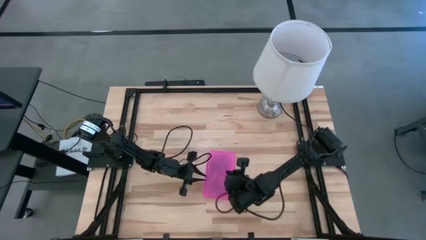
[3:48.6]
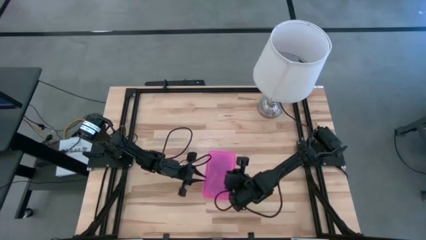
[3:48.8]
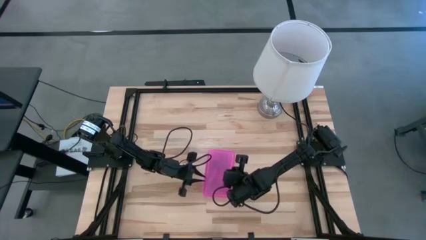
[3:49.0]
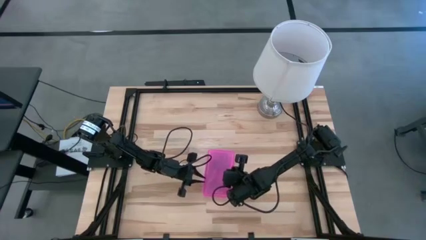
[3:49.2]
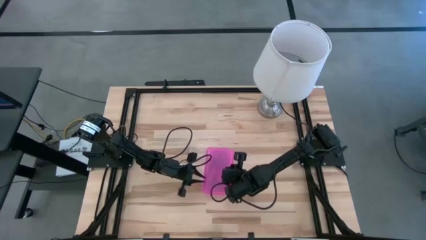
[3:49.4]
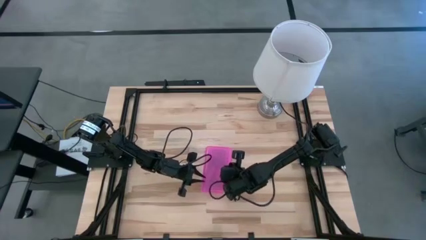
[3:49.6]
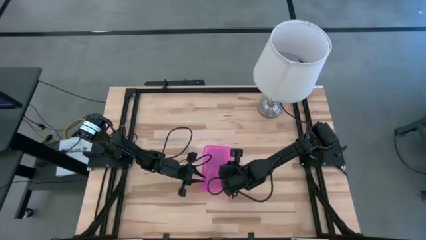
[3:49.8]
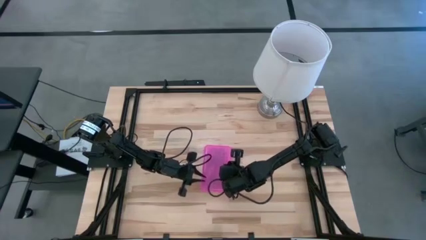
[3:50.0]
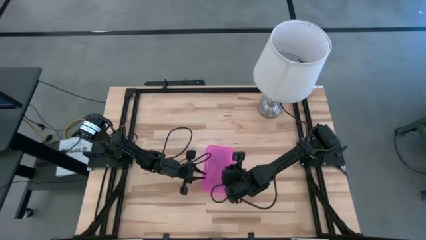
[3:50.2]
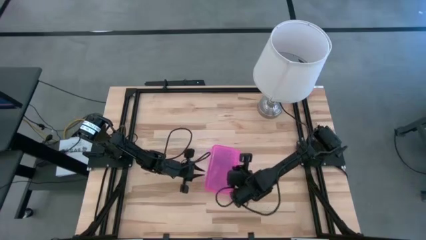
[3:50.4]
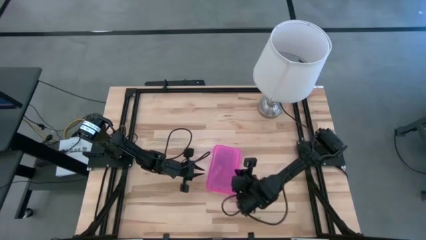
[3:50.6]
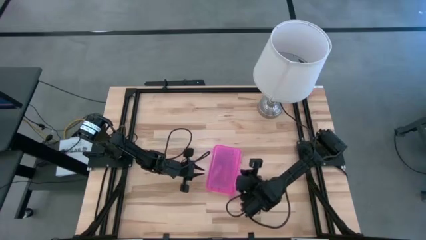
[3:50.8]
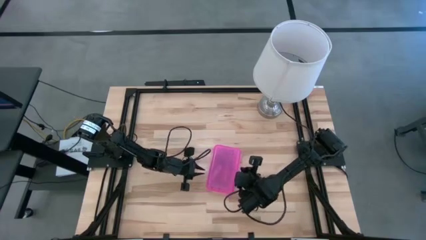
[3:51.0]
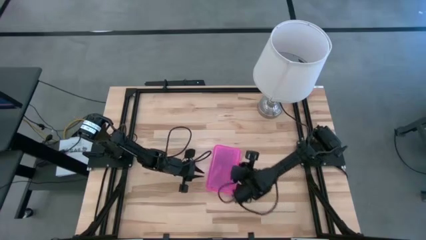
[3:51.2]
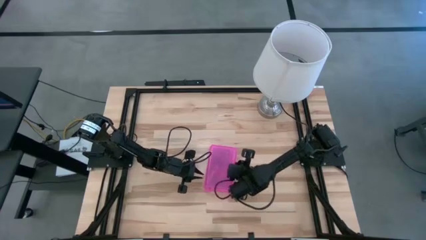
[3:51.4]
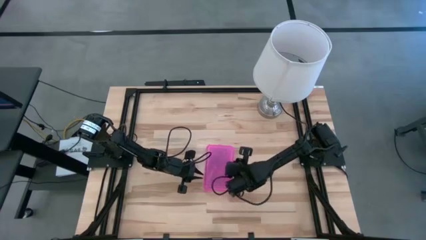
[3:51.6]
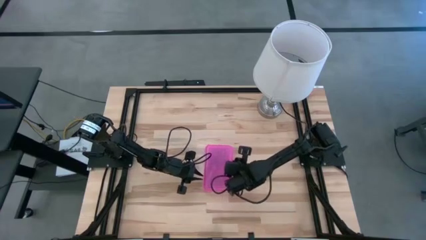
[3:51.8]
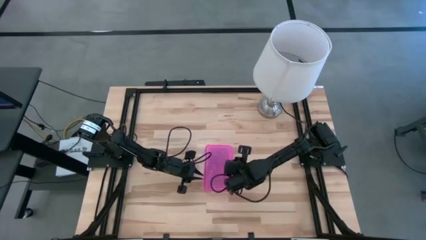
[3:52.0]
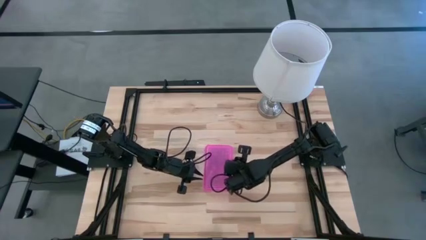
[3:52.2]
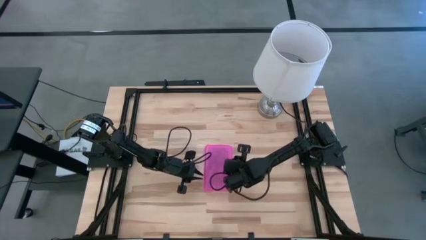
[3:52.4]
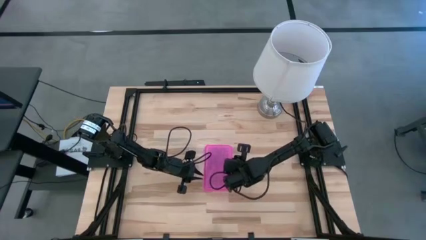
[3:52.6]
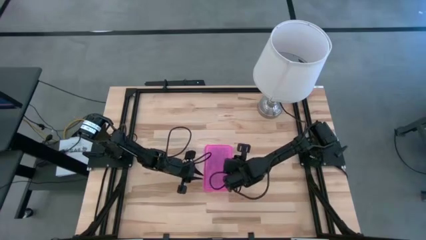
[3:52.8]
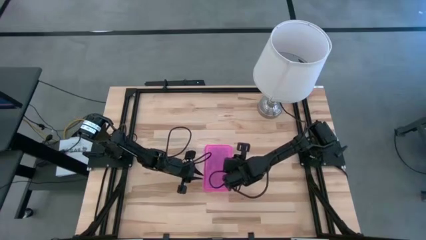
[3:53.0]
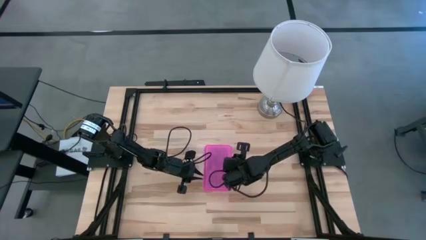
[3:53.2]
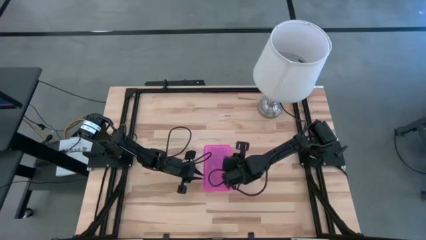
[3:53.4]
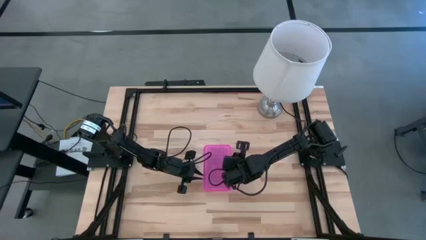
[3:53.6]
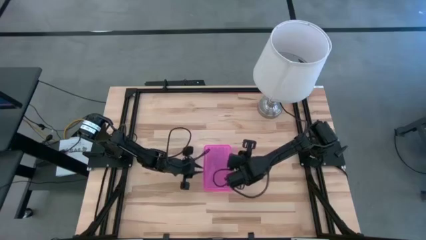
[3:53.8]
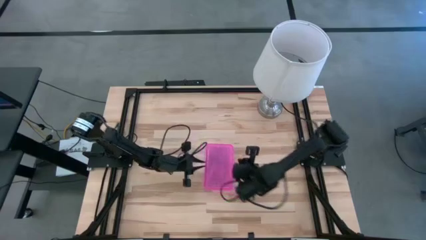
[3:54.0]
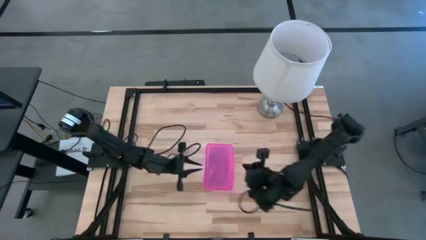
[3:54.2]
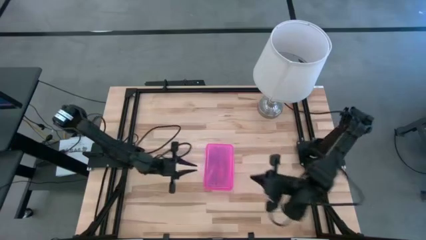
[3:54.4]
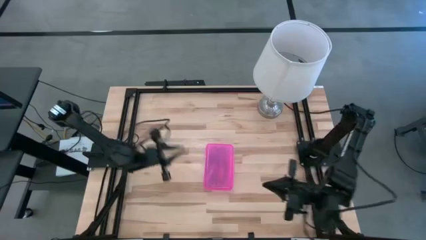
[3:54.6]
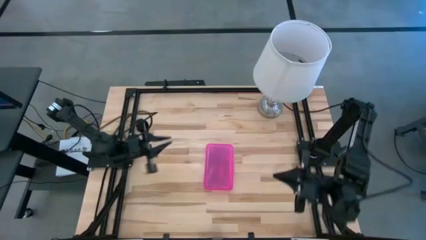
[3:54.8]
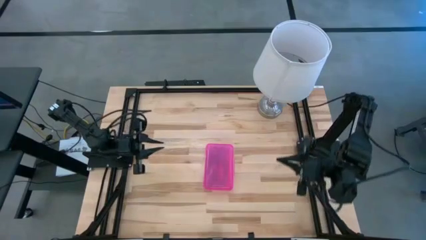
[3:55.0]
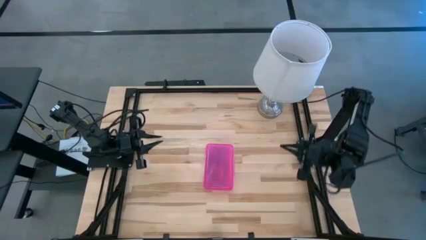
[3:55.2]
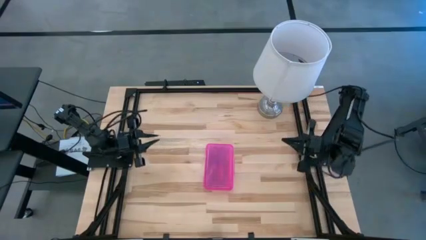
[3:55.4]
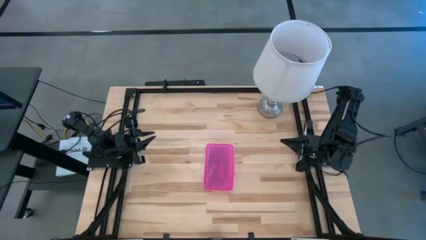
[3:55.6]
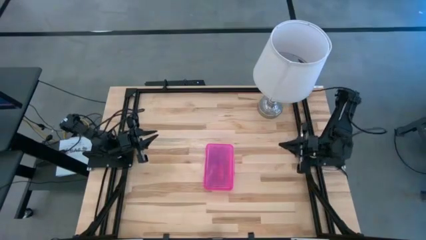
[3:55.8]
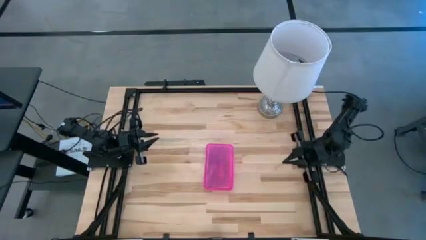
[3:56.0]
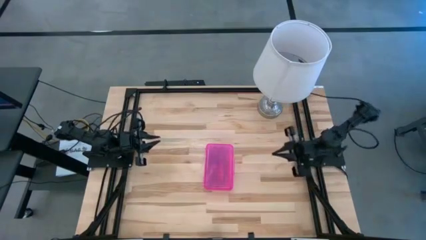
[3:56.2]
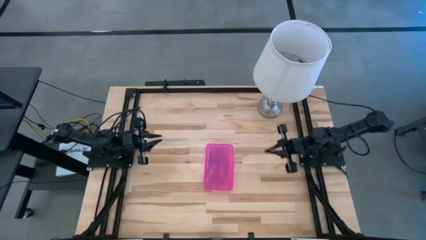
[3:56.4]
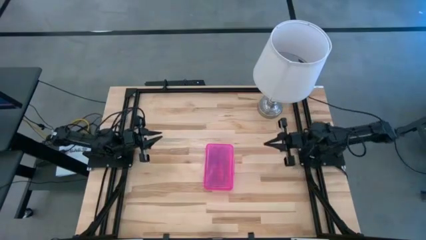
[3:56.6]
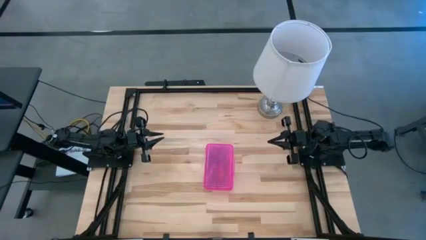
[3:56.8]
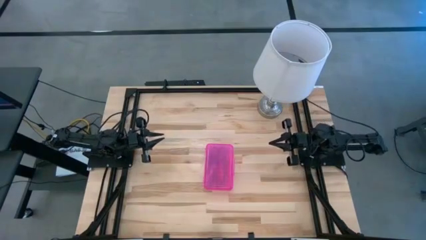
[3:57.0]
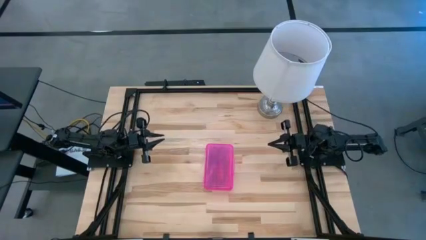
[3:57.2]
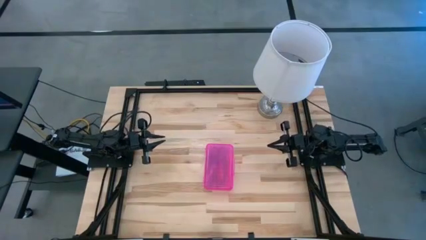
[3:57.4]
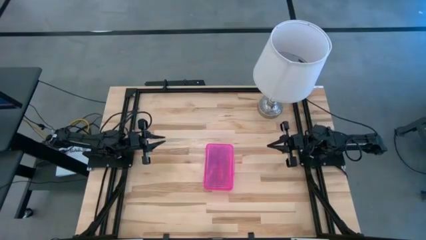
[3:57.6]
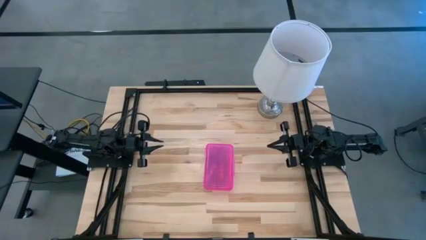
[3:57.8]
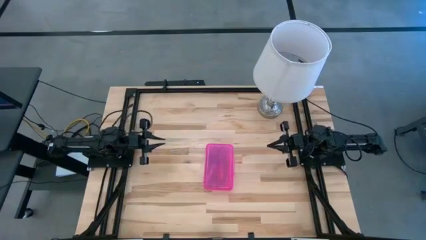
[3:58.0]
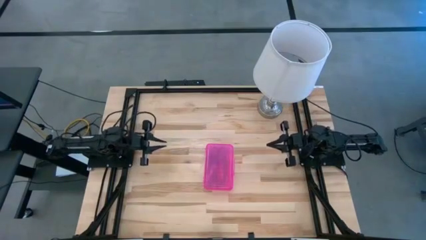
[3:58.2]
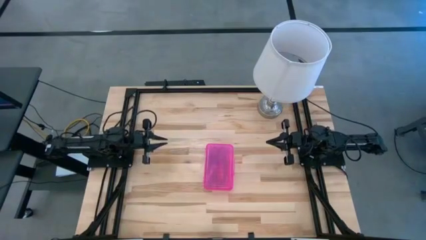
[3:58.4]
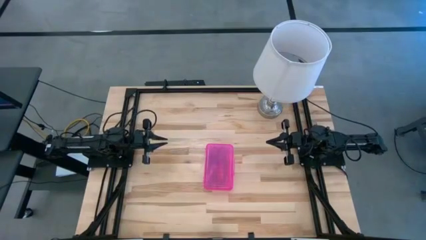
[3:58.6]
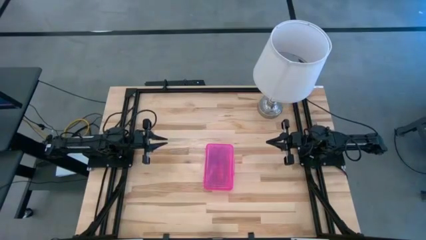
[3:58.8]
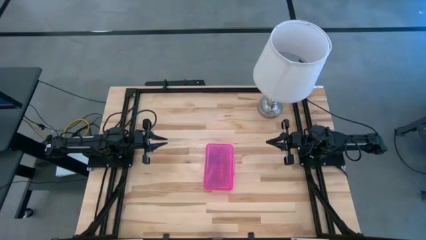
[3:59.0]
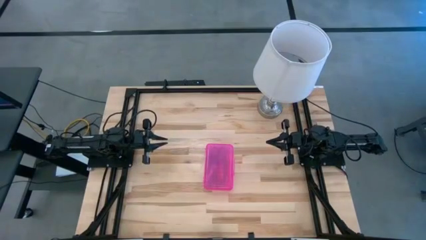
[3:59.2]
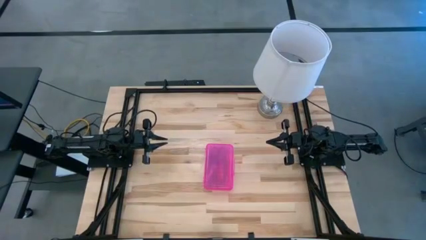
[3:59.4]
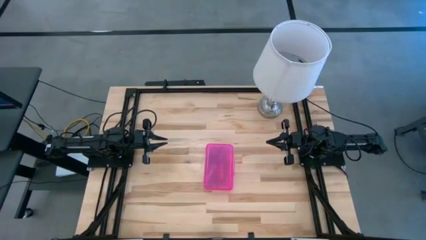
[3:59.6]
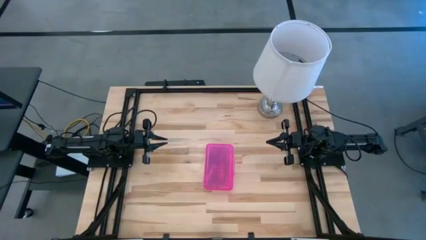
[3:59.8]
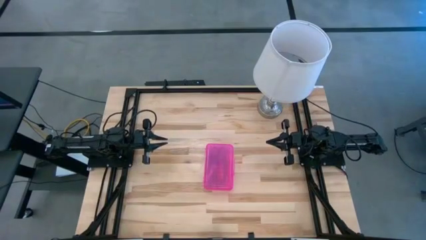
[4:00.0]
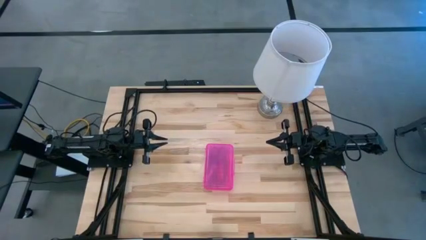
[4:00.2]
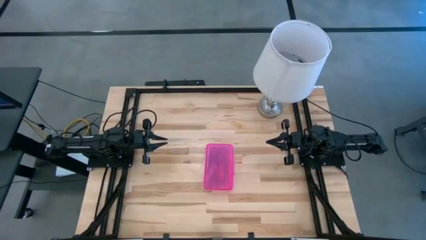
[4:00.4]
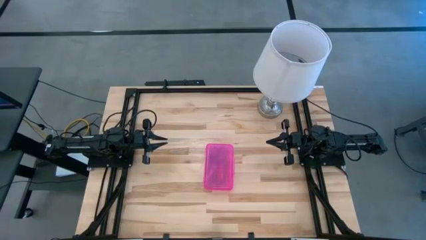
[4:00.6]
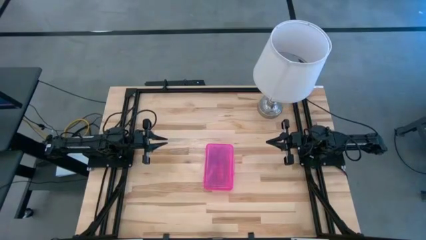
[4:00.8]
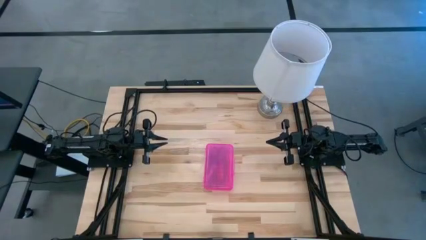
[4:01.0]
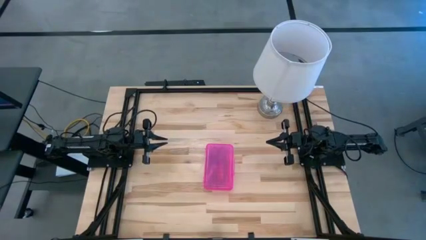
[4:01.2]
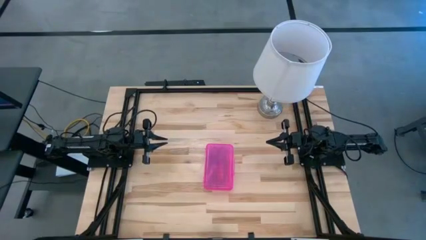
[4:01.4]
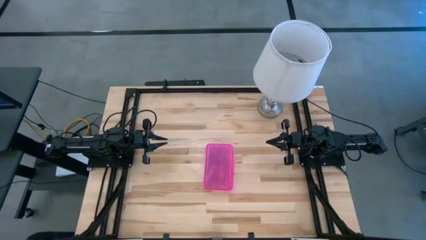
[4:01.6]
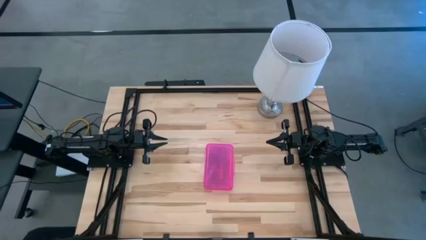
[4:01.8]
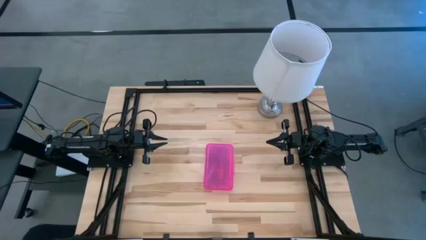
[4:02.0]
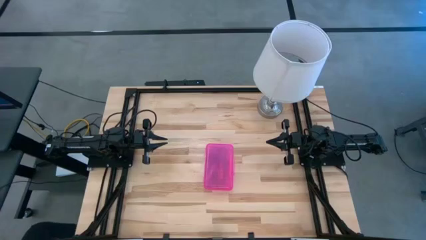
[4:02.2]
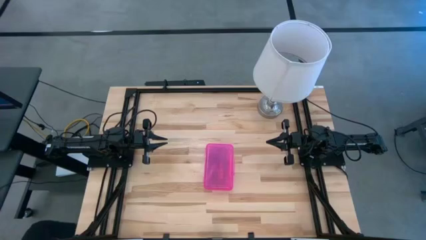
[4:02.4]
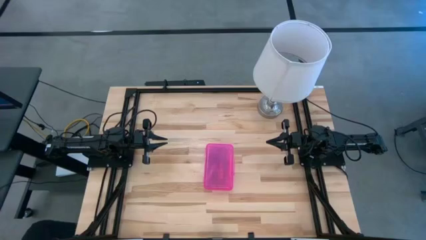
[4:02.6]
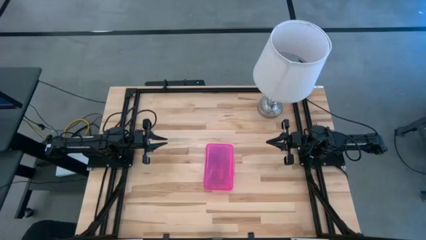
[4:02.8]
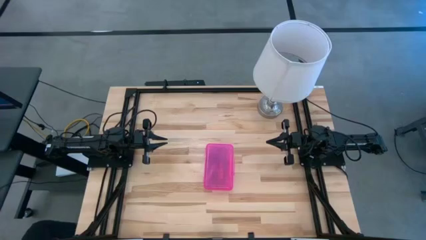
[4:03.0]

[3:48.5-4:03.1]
Task: Pick & place school supplies into a supply box
Return to Home Position

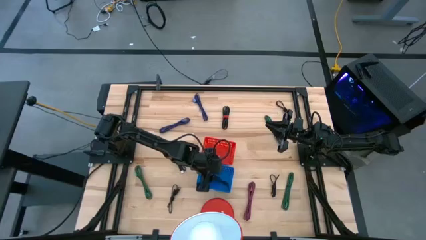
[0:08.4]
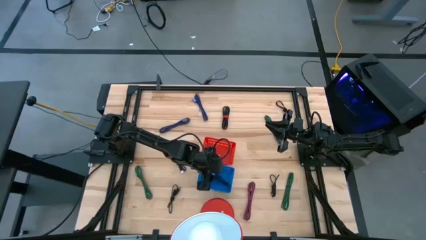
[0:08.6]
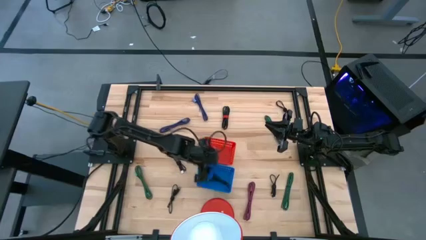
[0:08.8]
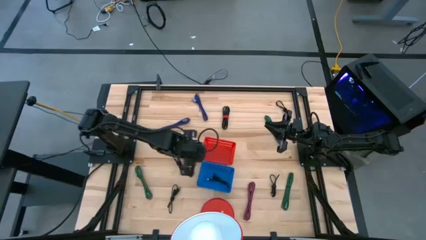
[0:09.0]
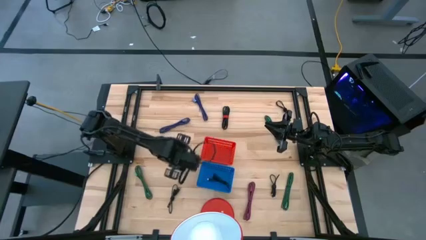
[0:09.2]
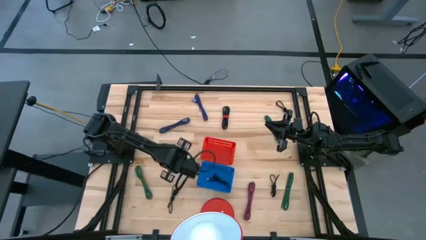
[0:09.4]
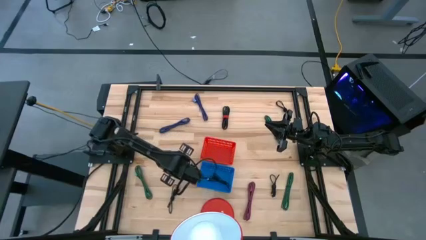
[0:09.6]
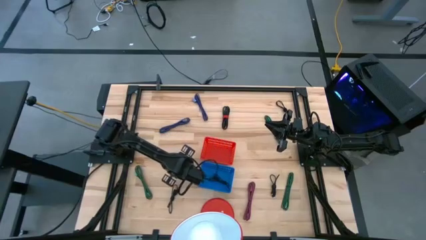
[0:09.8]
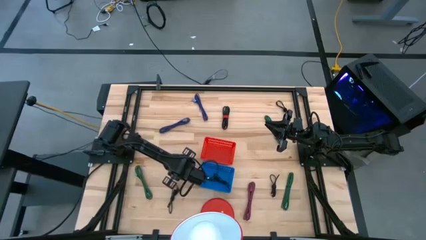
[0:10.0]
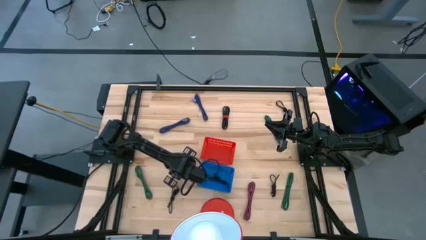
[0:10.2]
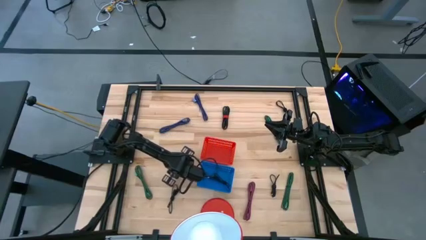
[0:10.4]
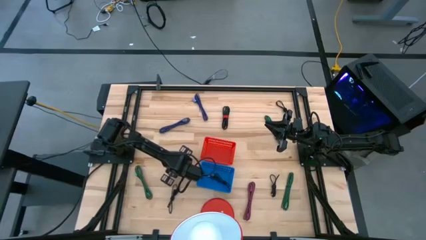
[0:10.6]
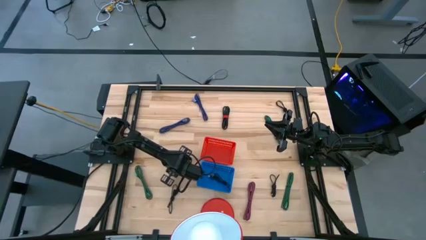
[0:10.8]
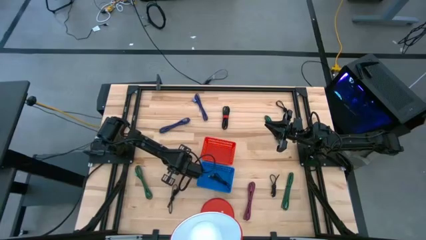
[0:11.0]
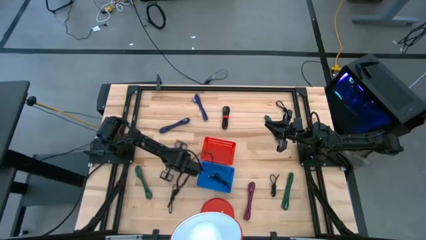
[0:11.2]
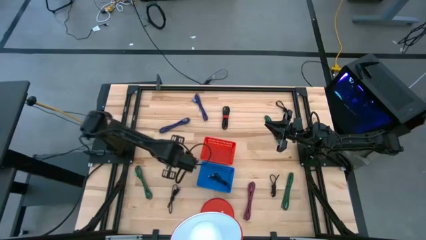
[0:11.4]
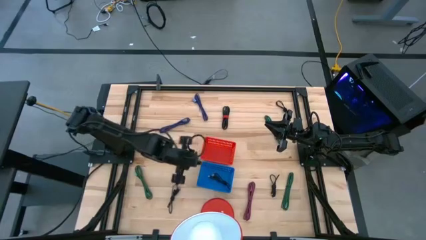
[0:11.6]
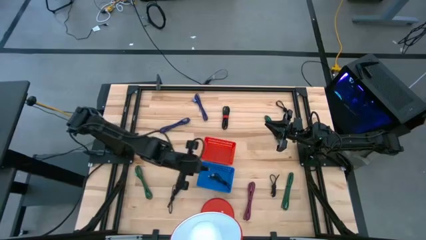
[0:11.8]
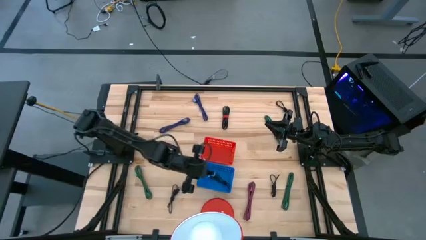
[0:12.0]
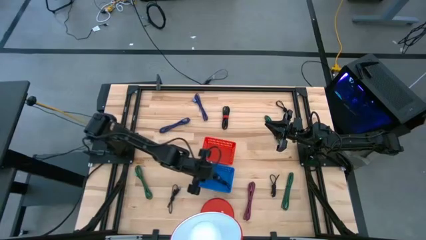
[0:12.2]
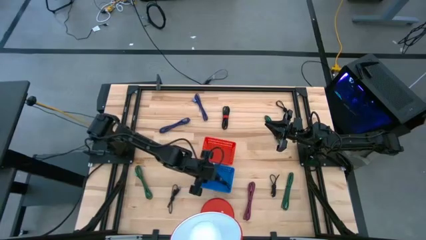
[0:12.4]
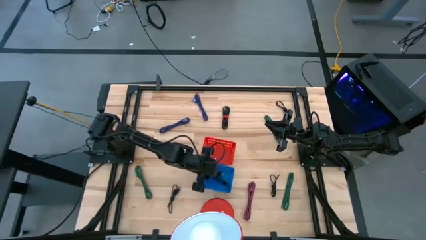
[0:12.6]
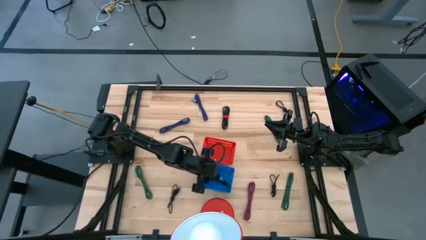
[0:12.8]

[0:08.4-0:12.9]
Task: Pick & Place USB Port
Put the small black USB cable into the blue bin
